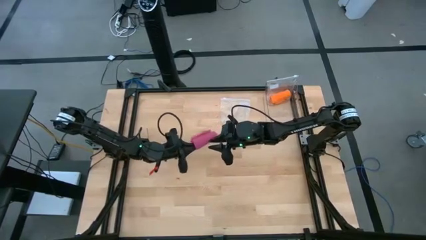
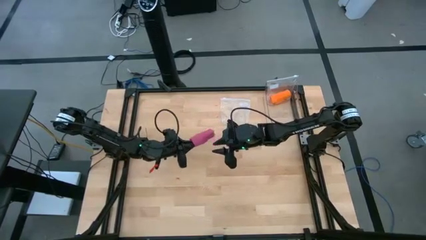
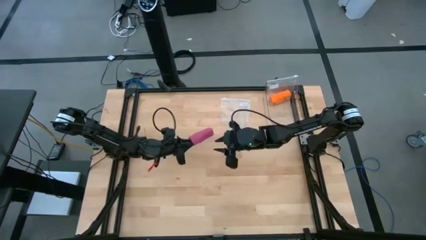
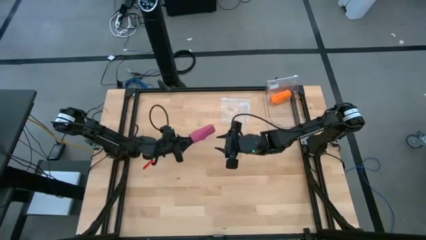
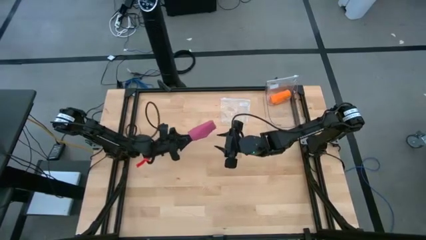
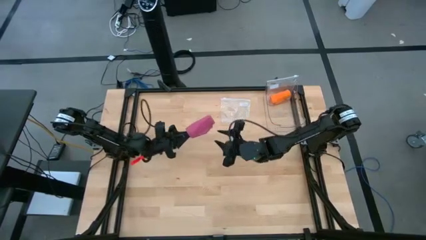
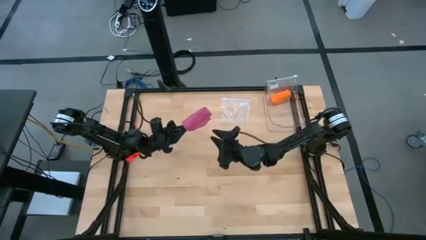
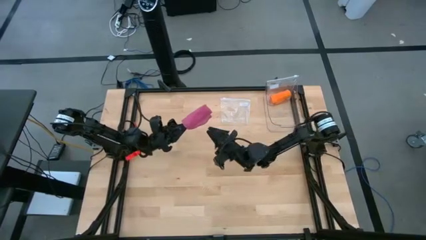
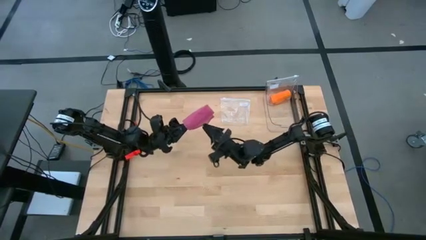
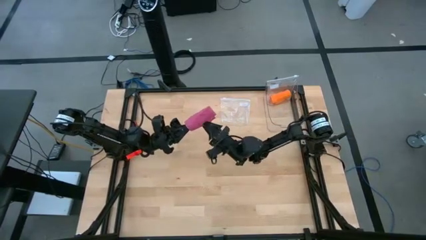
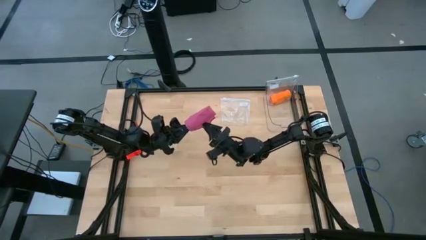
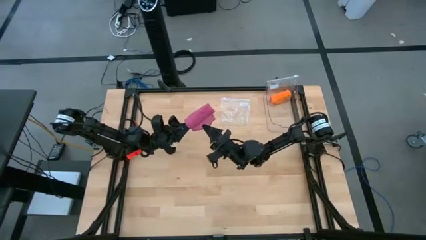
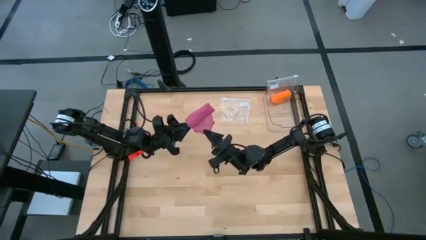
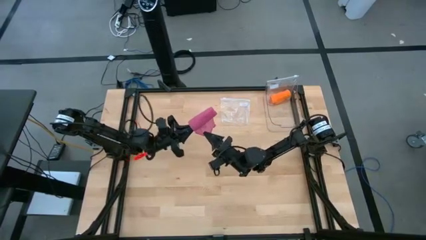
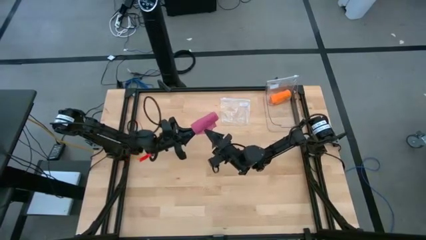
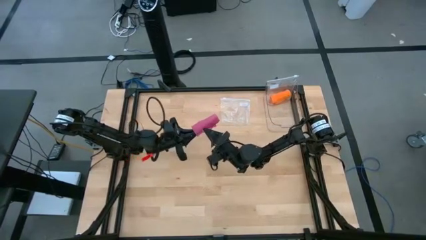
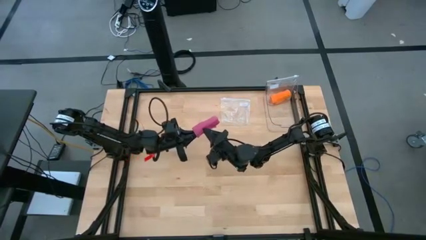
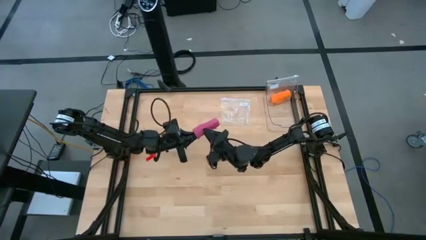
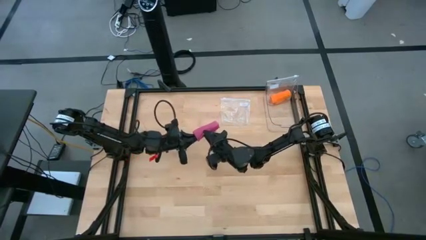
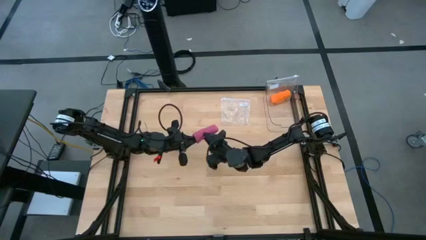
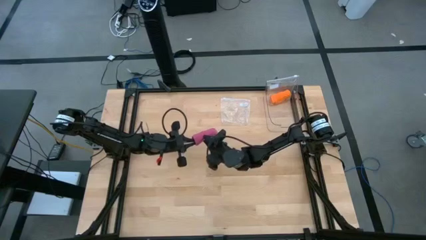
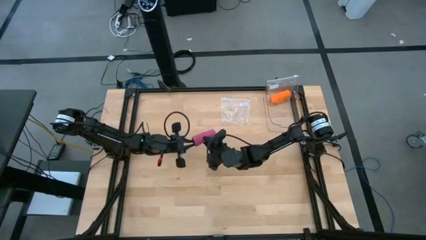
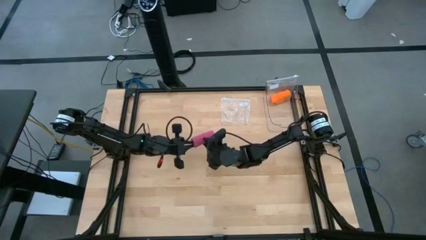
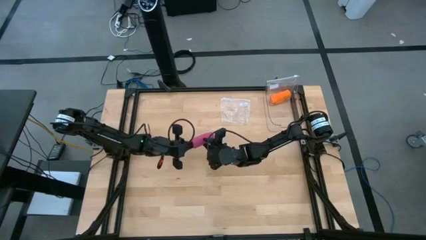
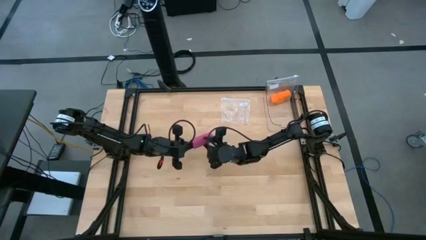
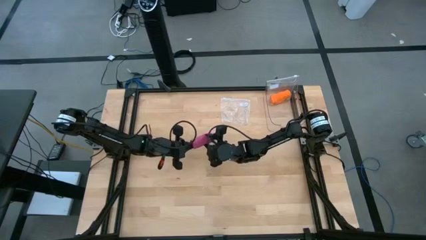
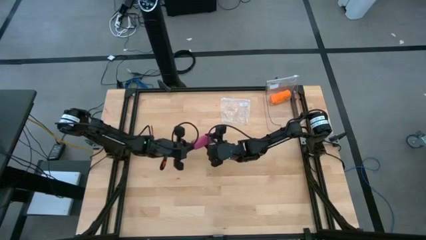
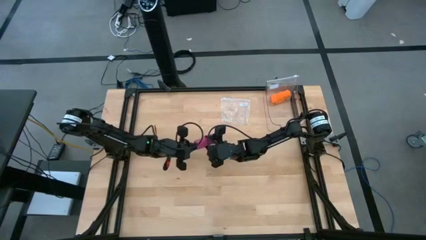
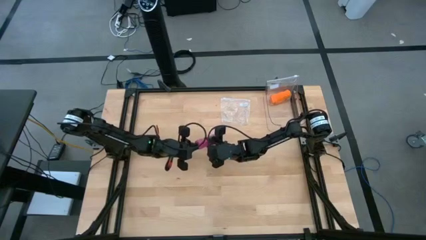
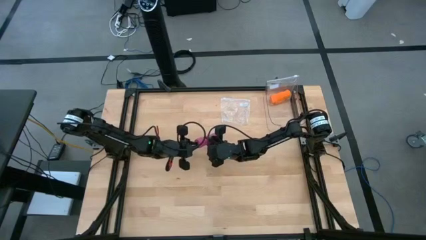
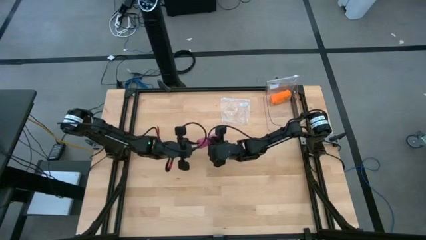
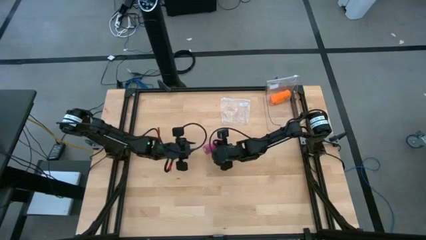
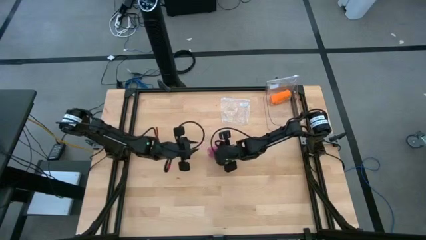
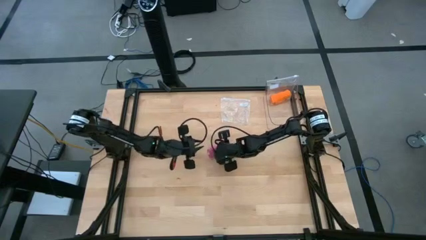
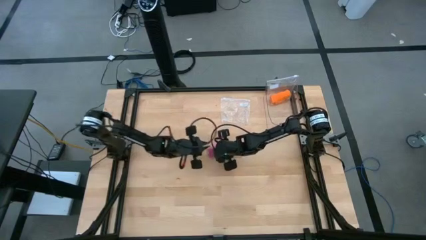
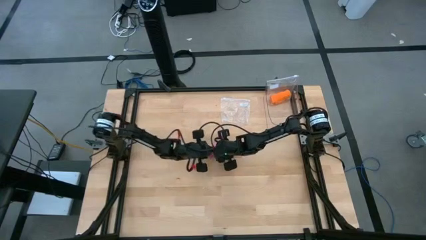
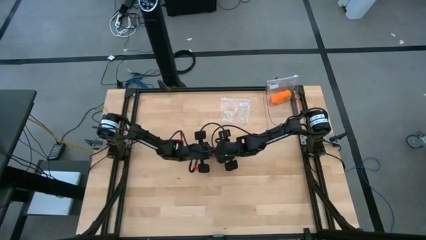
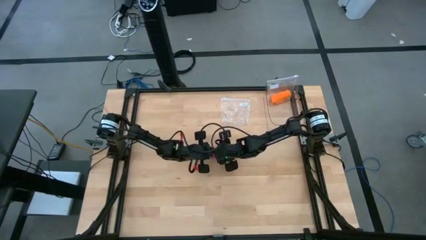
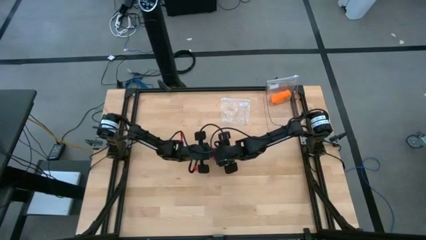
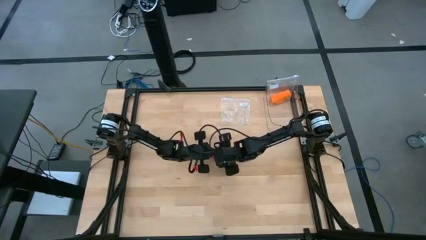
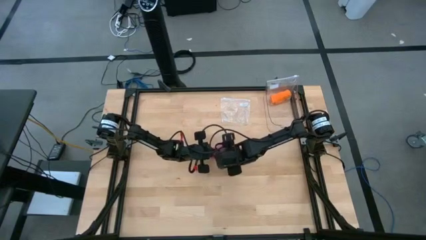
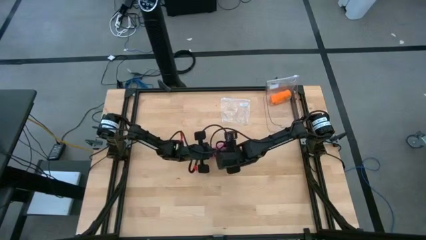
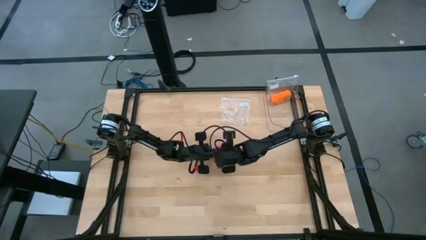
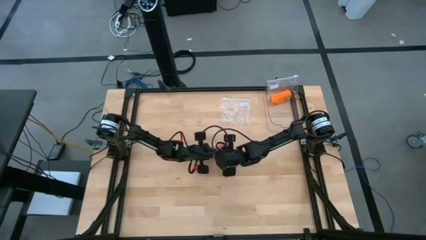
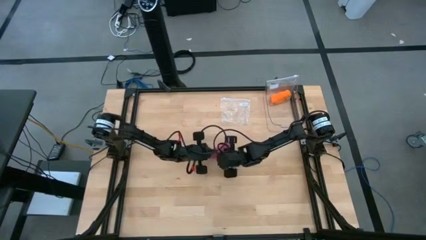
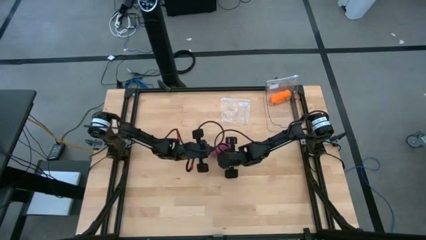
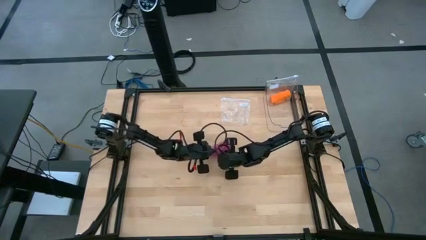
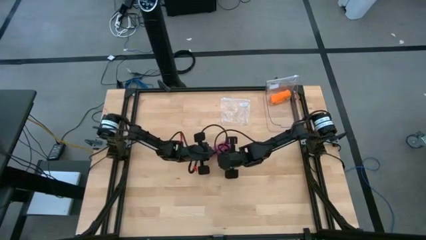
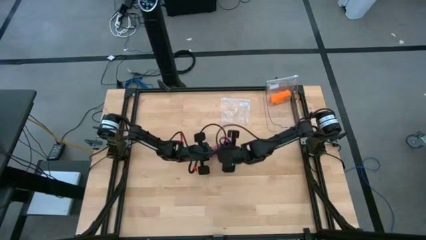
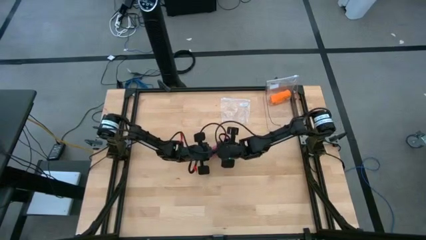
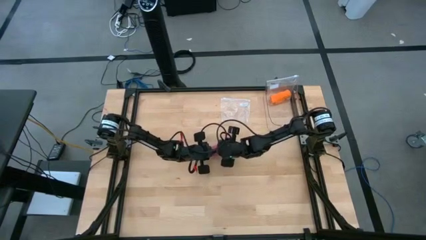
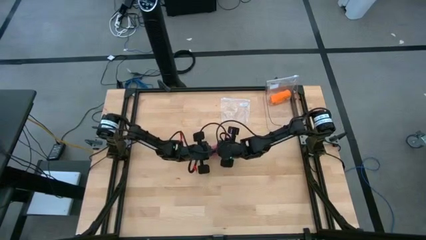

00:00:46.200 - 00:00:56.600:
Task: Roll bandage
Roll the pink bandage

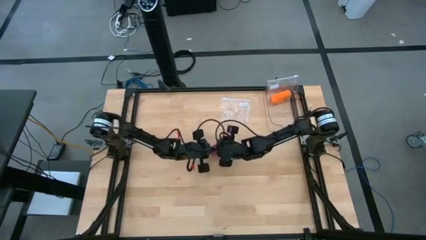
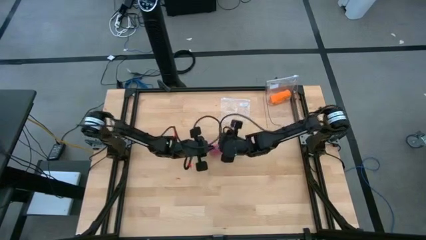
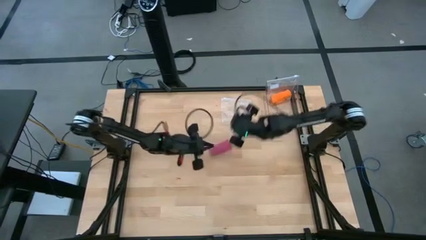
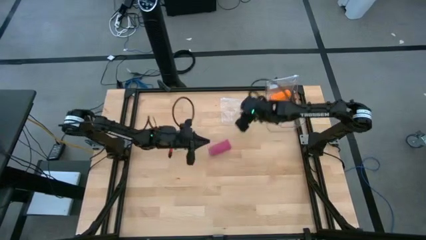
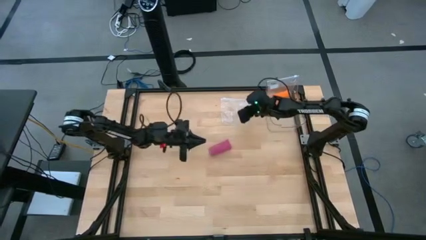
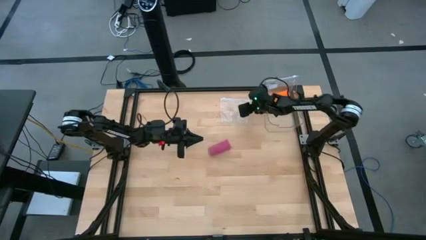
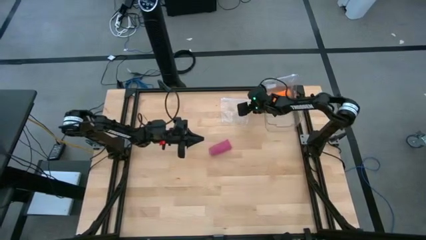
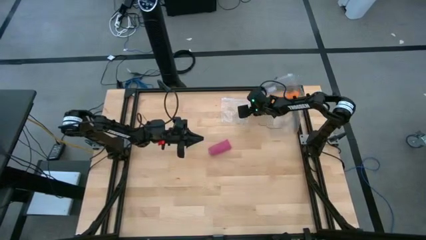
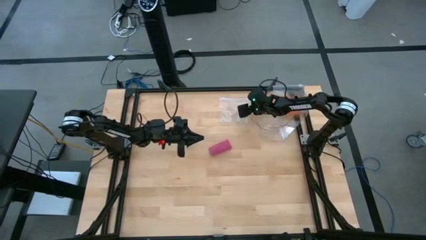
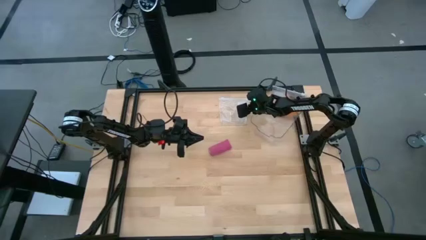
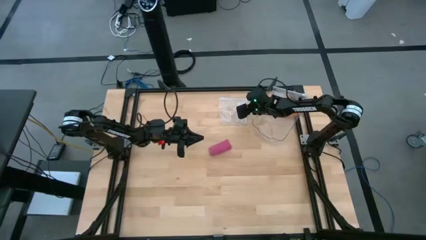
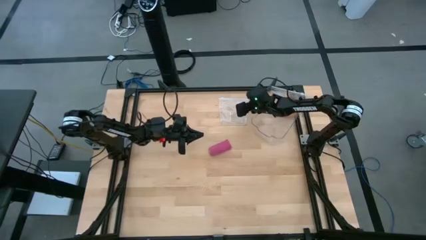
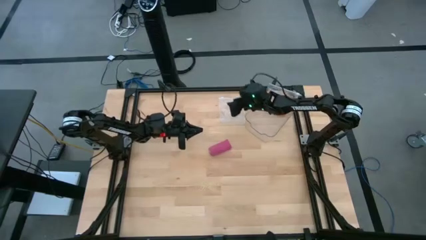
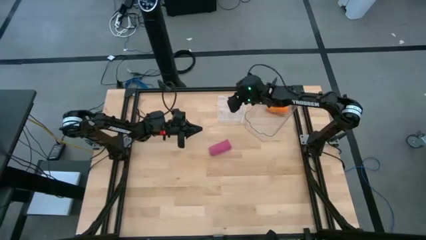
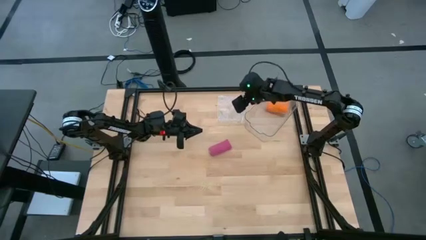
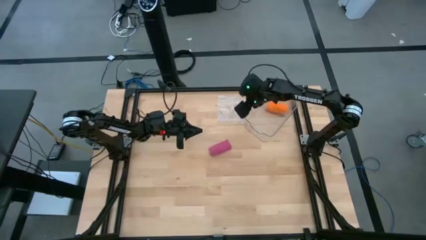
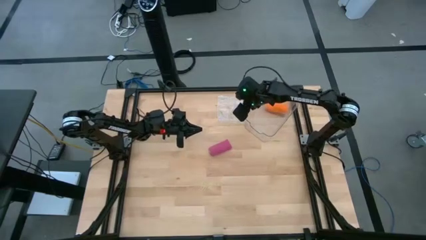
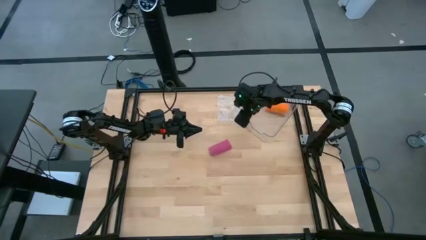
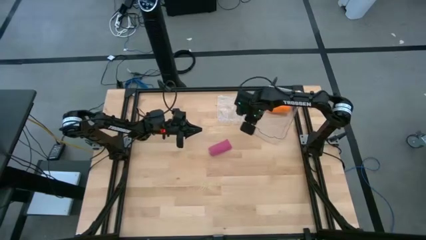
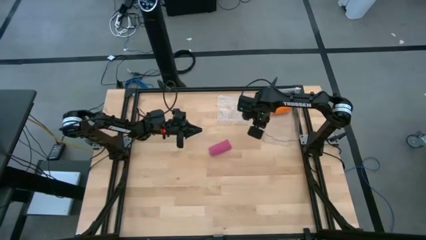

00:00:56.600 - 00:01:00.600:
Adjust the transparent bin

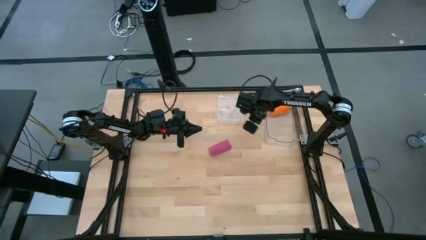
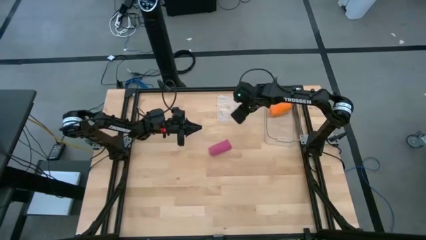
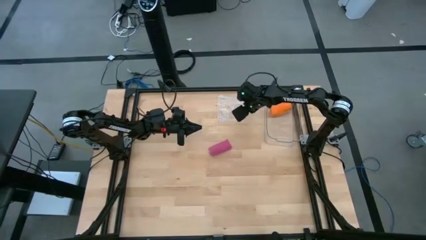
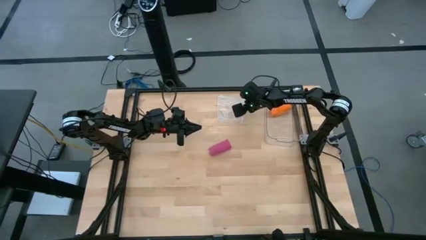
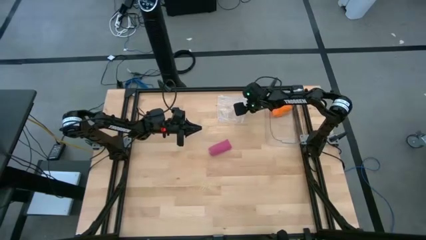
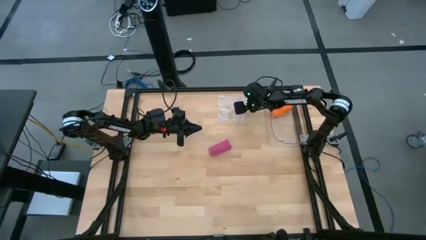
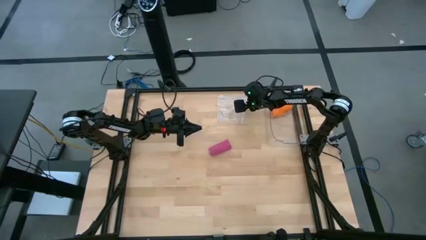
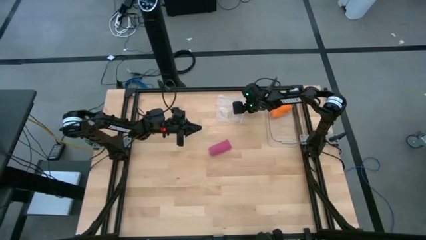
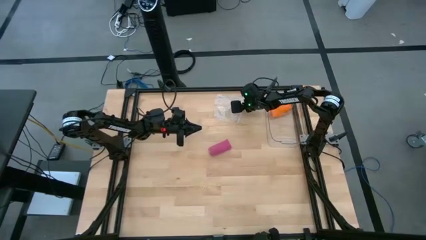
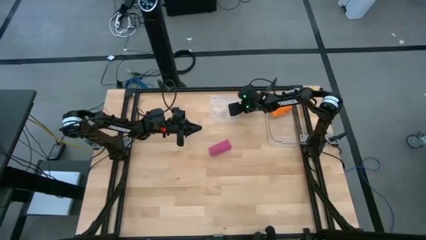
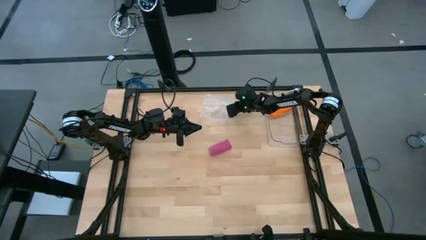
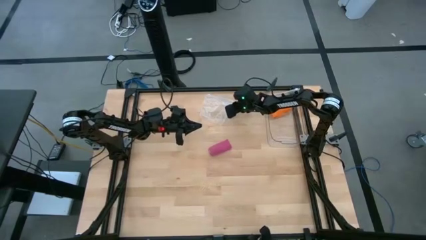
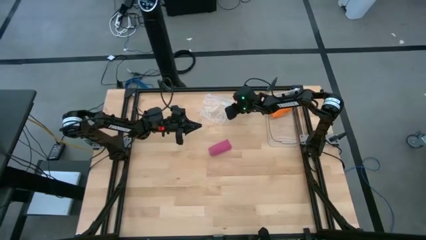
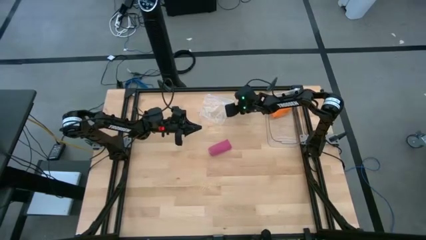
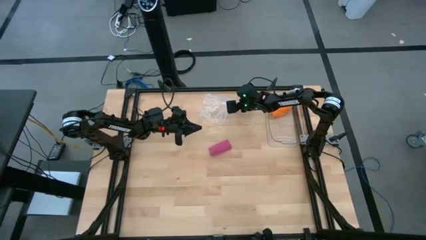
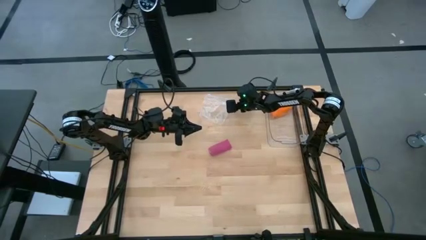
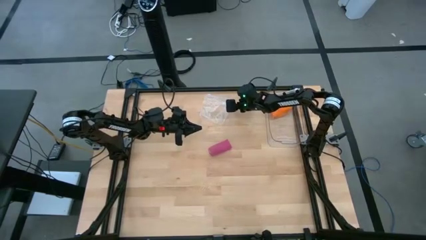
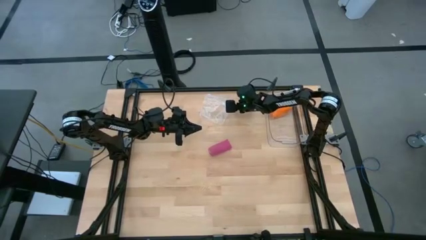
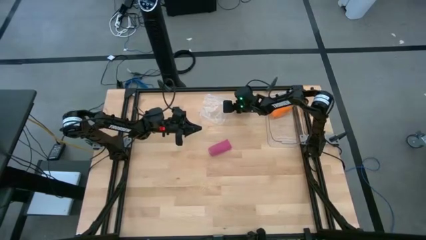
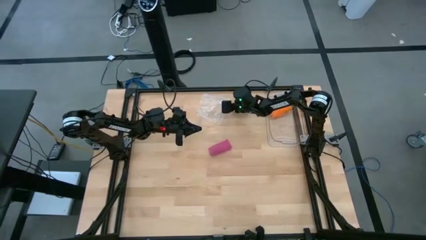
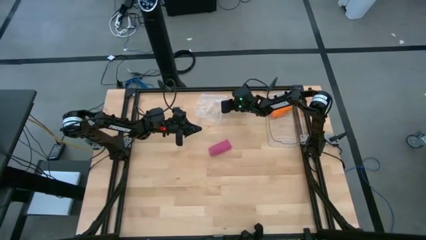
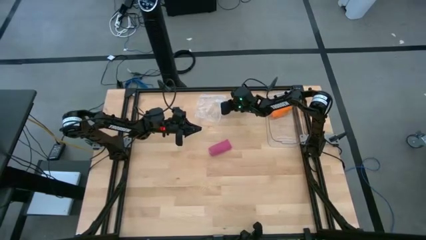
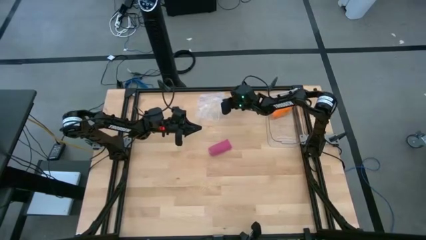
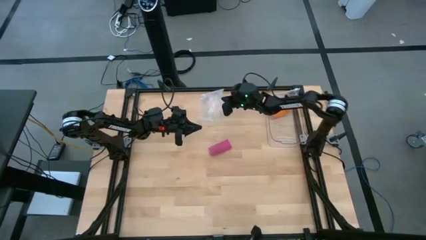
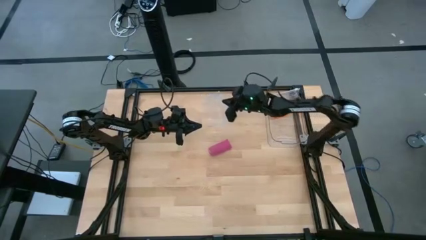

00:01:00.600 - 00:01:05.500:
Open the transparent zip bag
